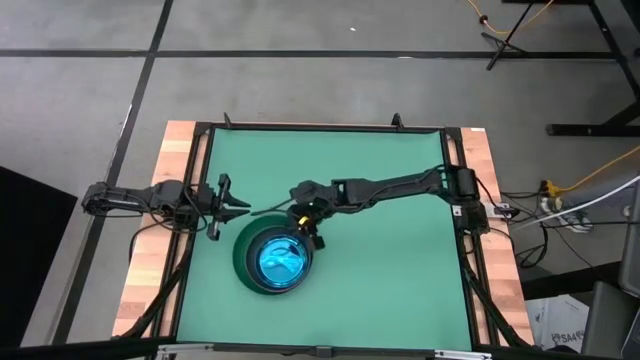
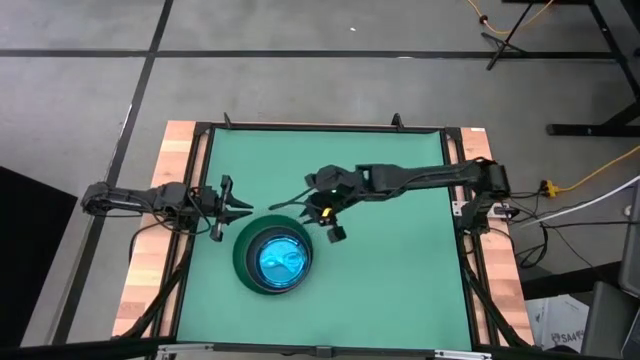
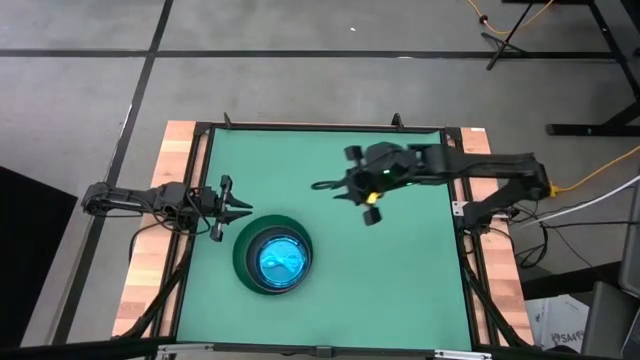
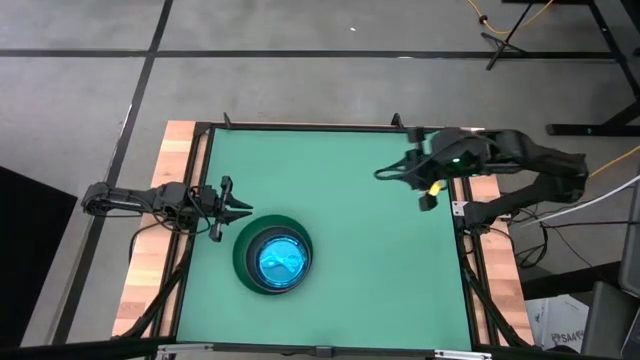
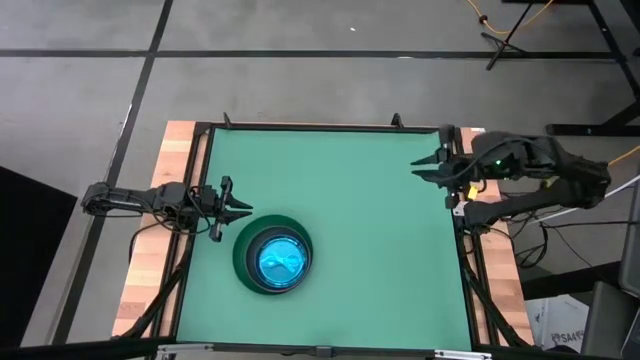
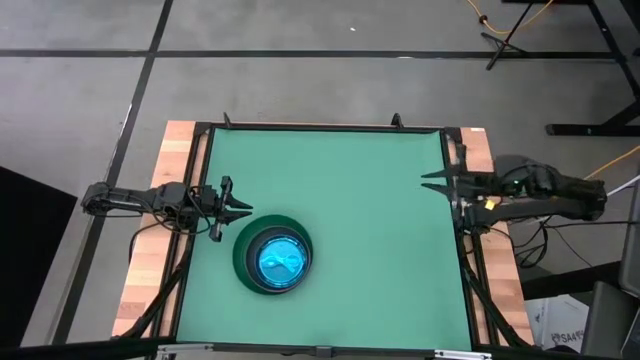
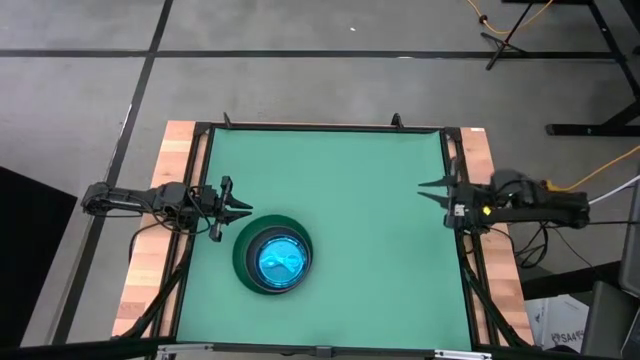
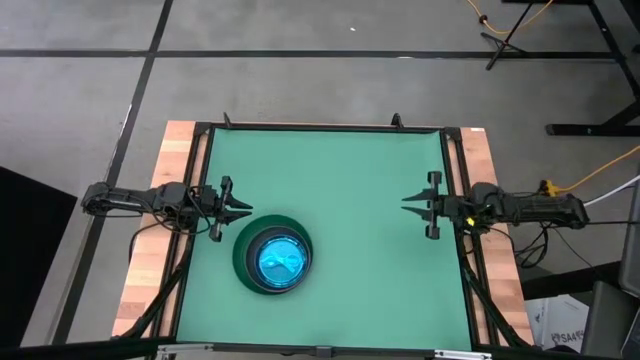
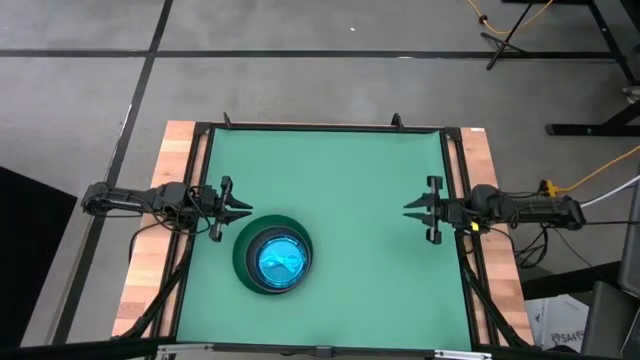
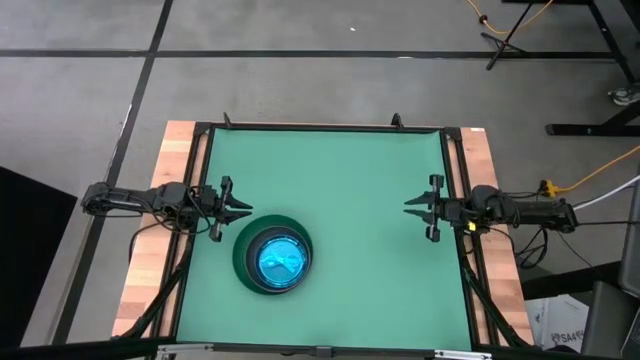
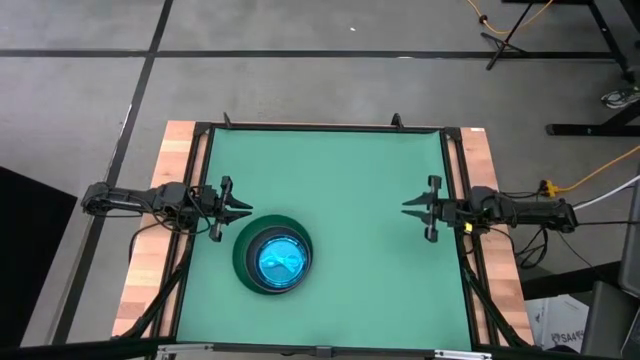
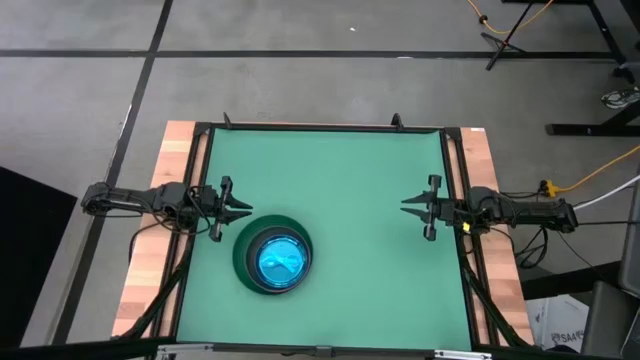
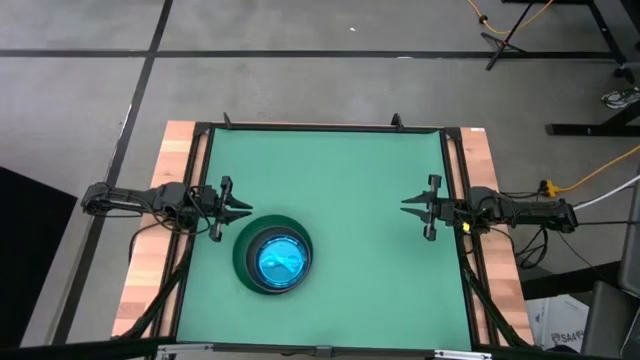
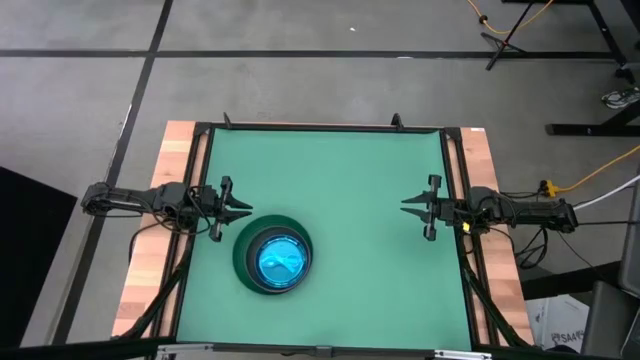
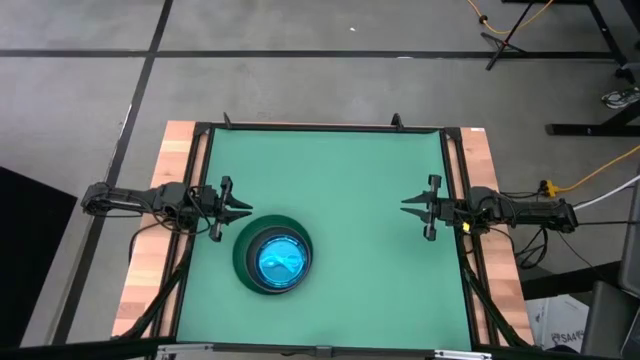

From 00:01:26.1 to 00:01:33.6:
Task: Stack plastic plates
Return to Home Position

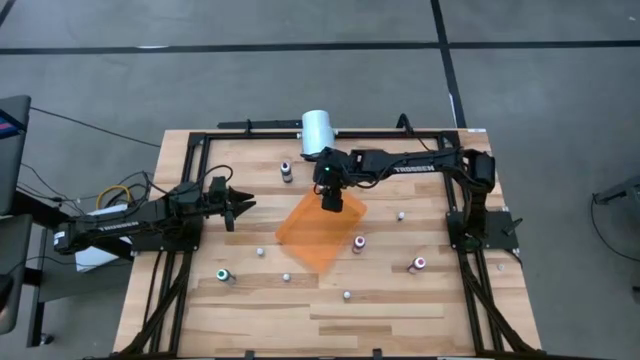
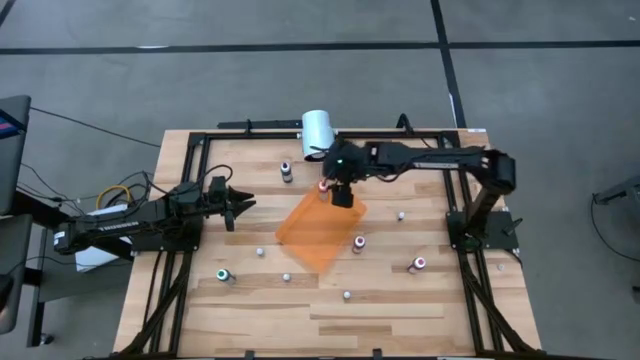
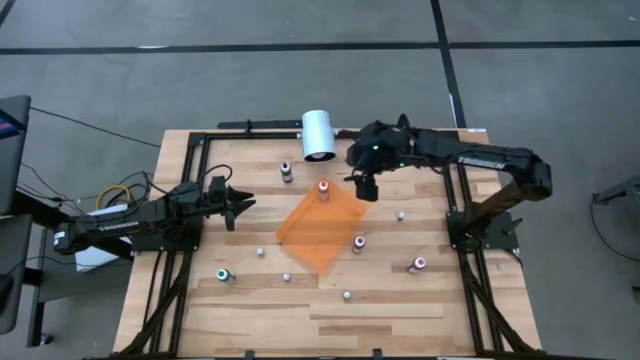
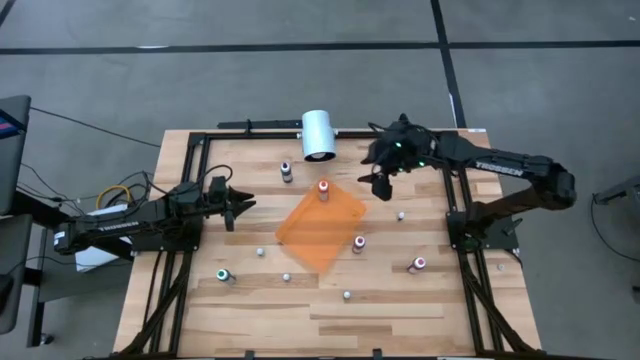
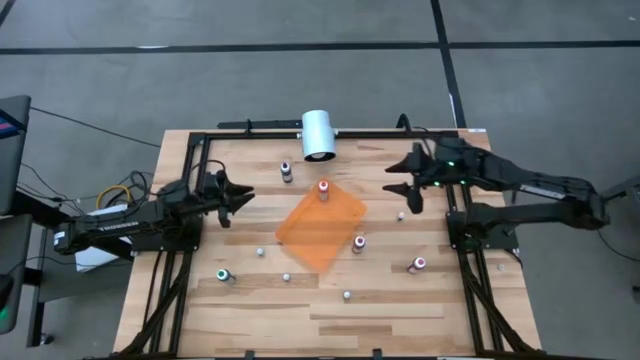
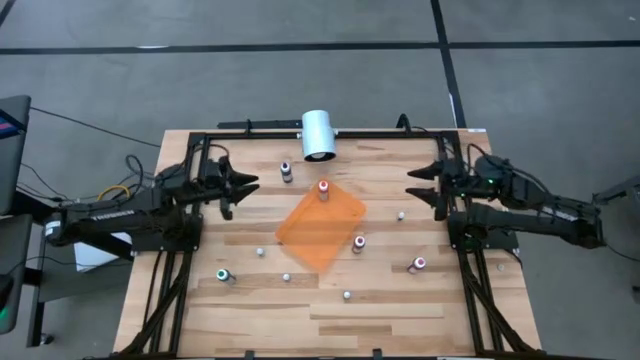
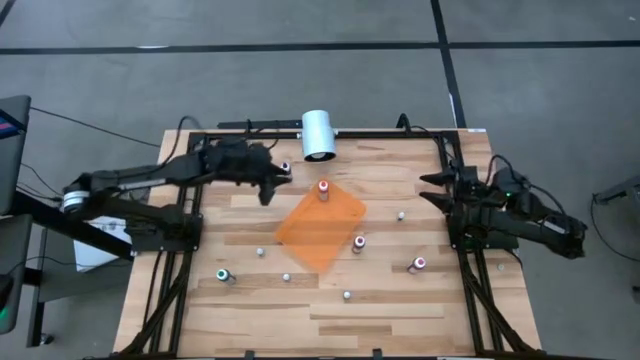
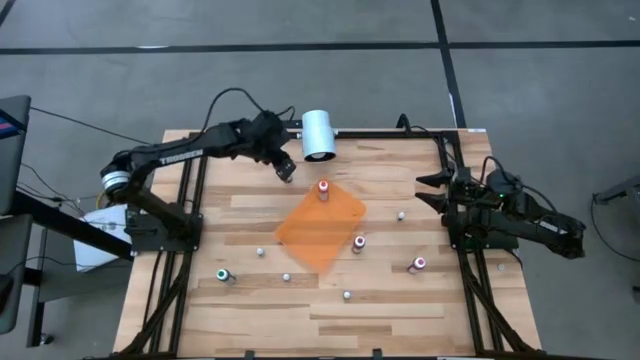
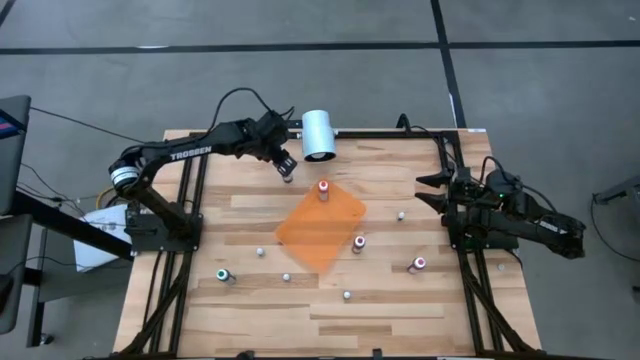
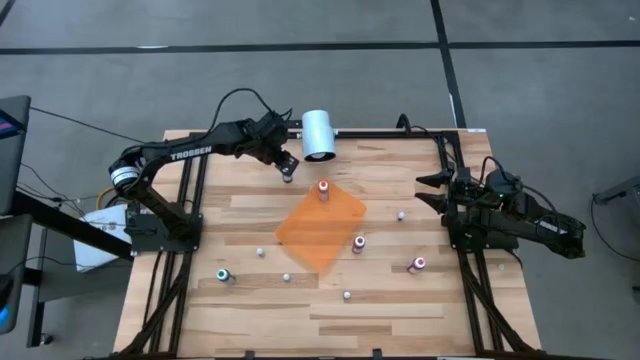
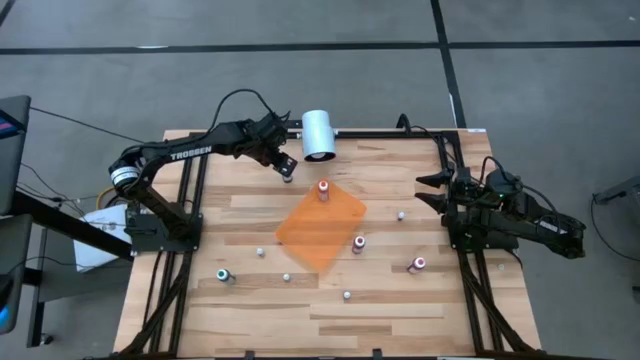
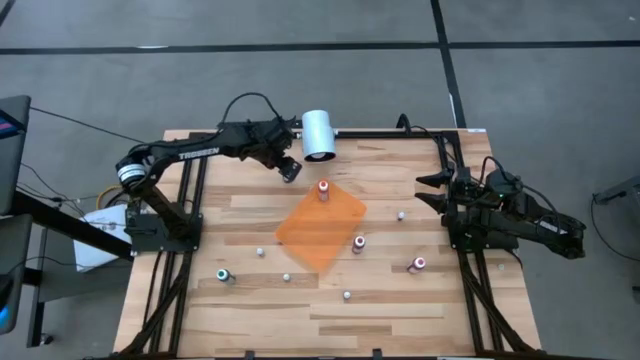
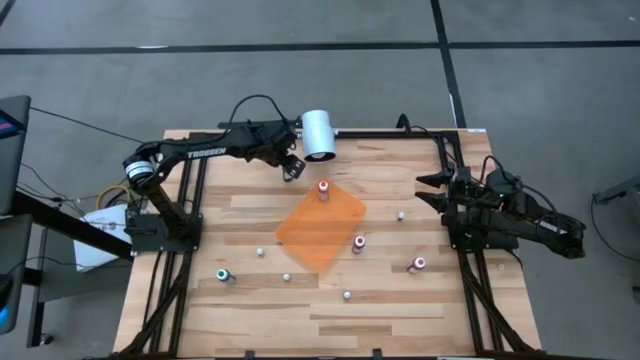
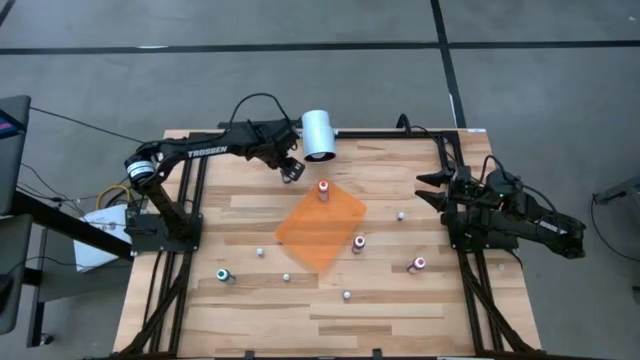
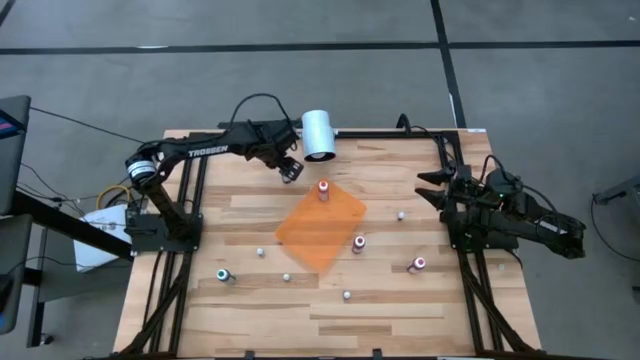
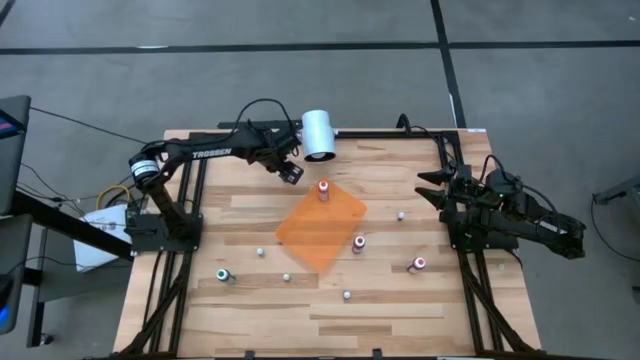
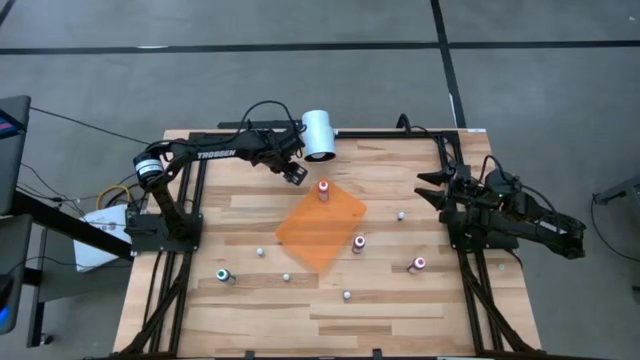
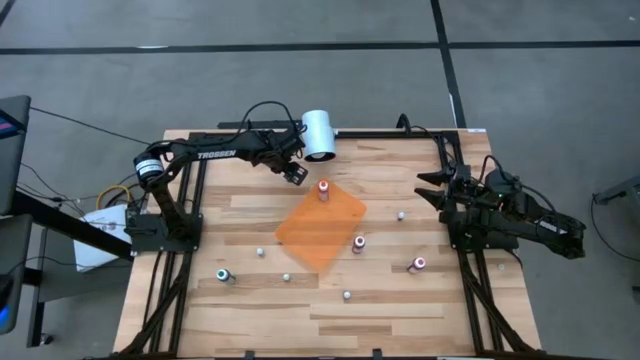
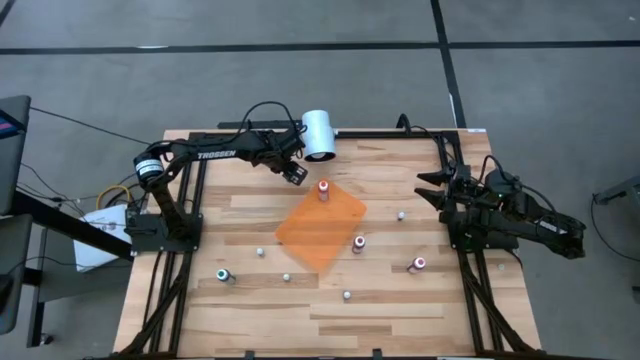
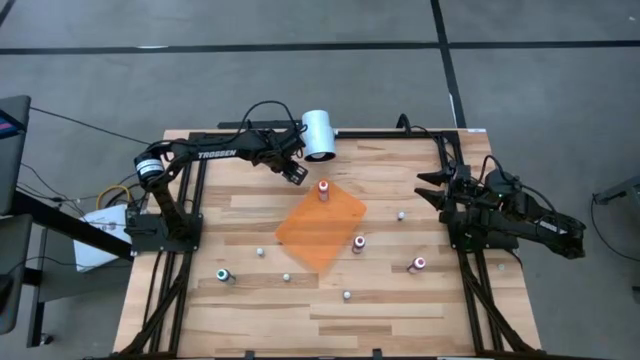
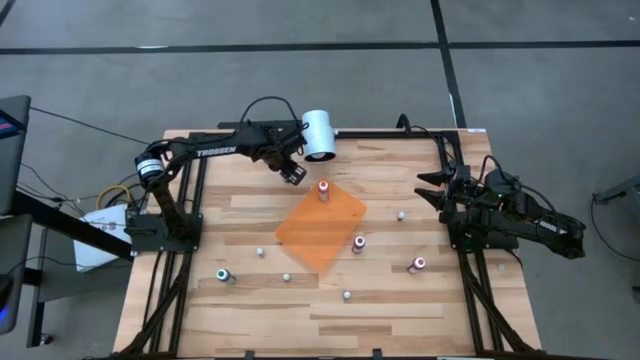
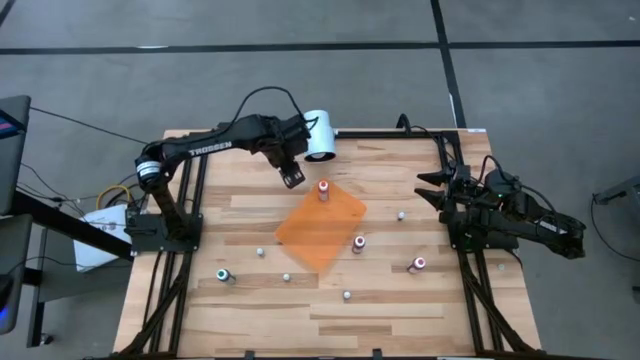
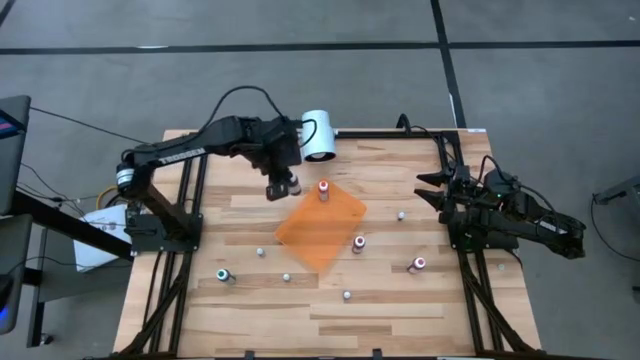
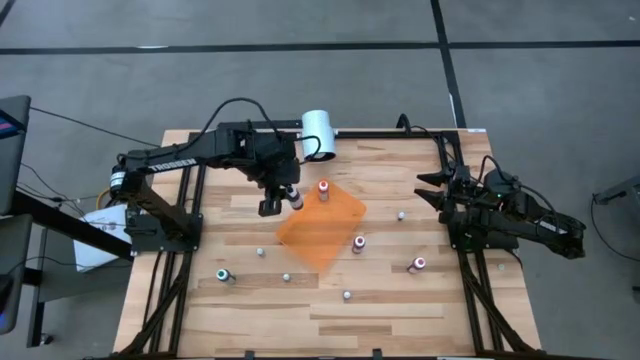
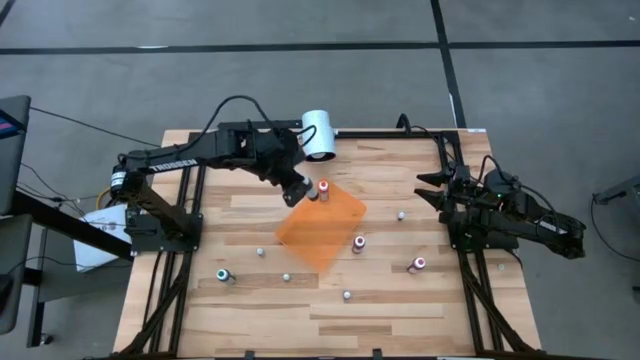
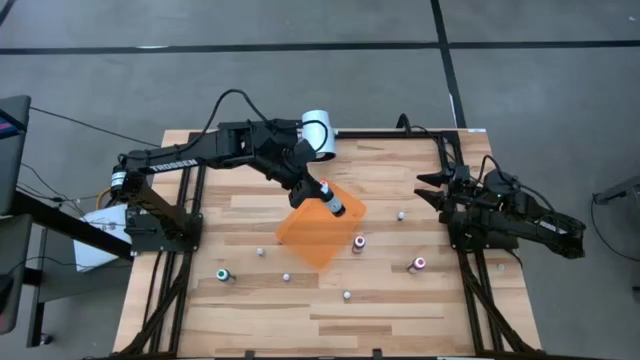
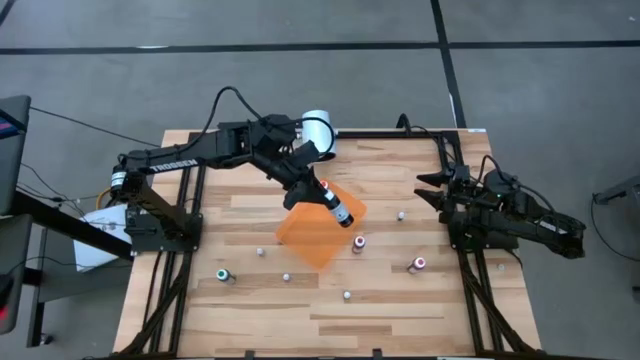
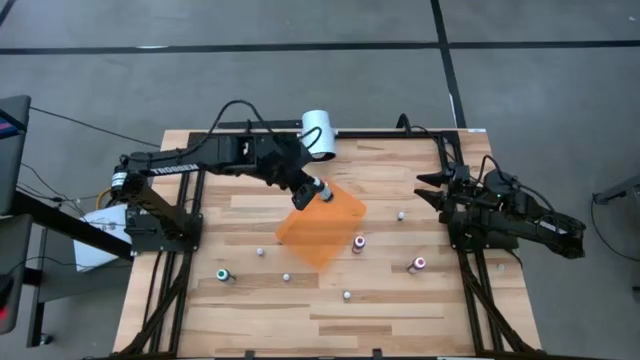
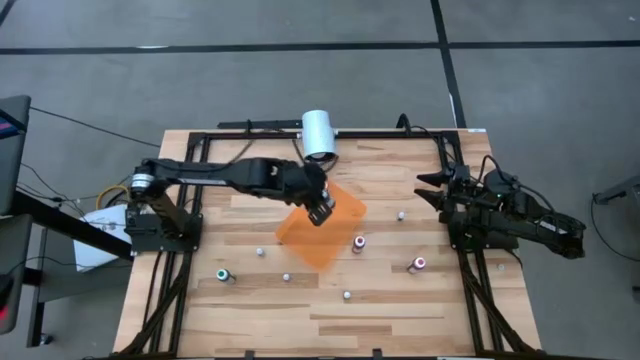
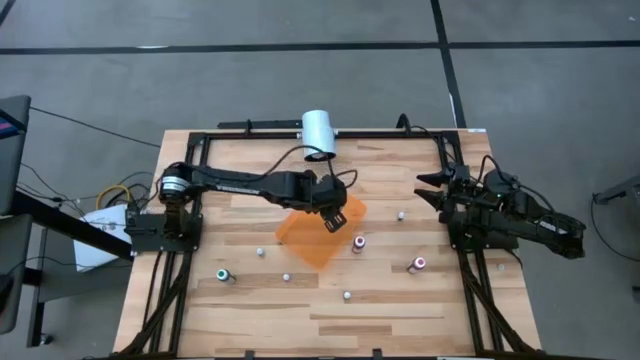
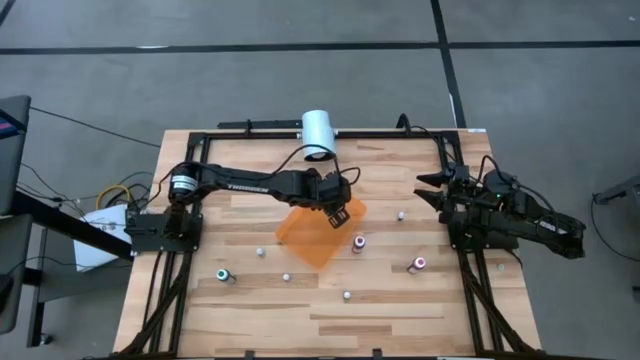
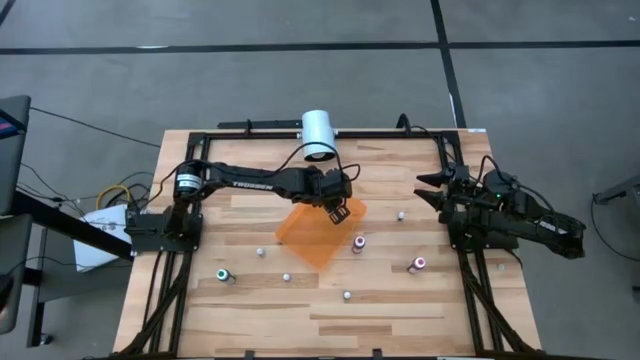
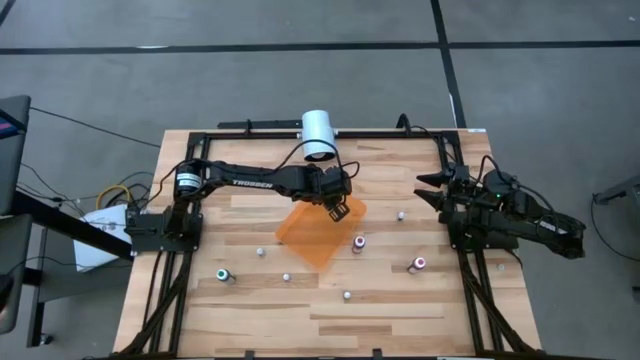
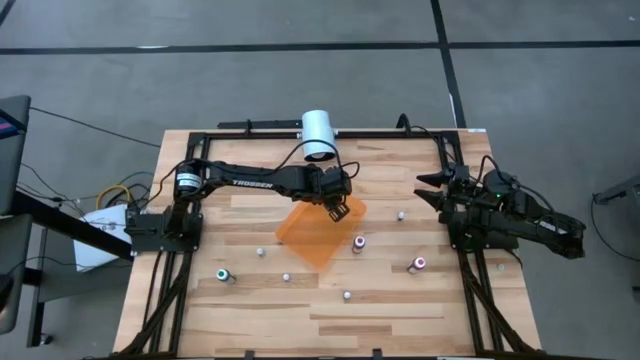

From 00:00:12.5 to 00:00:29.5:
Task: Pick & Place food coloring
Put the big black food coloring bottle into the orange bin
